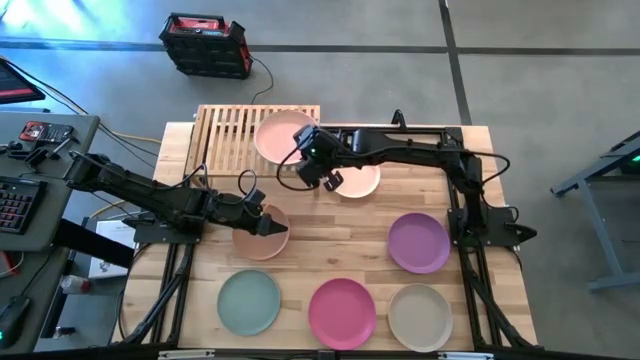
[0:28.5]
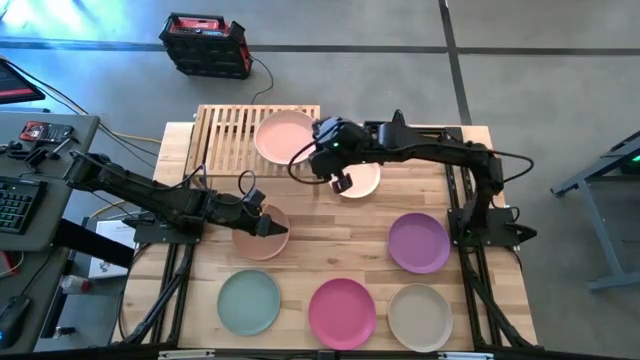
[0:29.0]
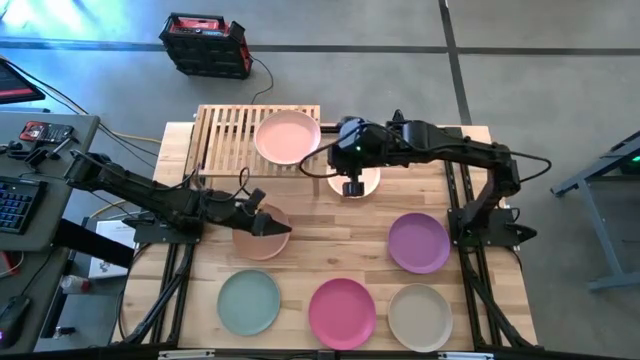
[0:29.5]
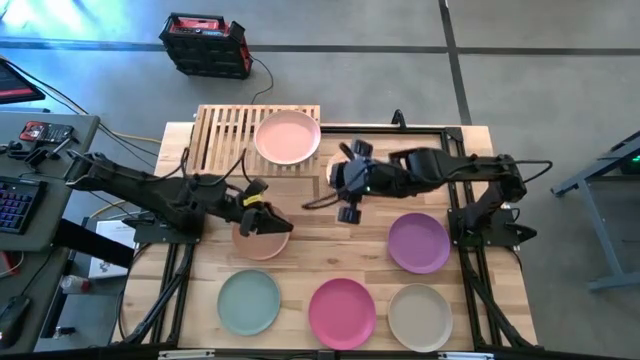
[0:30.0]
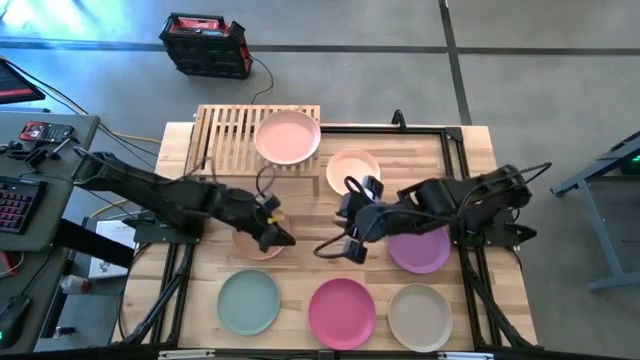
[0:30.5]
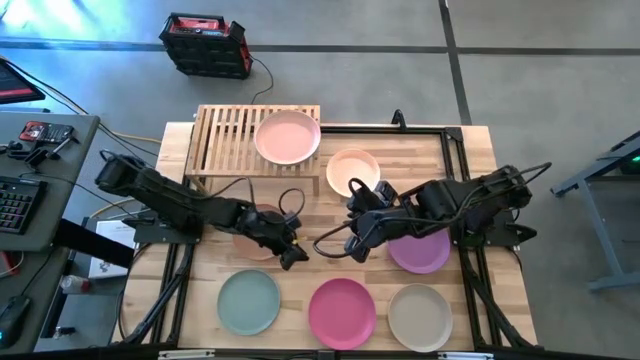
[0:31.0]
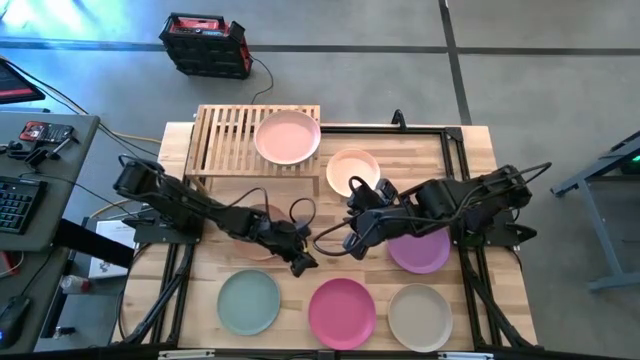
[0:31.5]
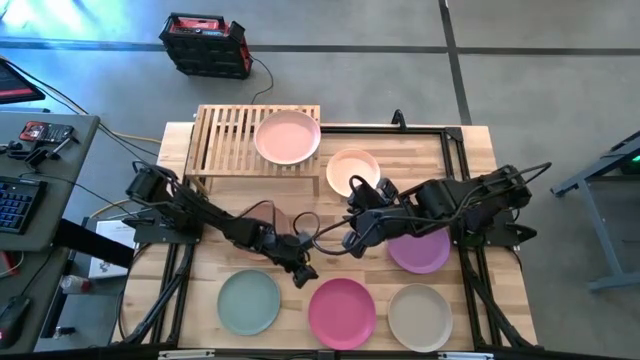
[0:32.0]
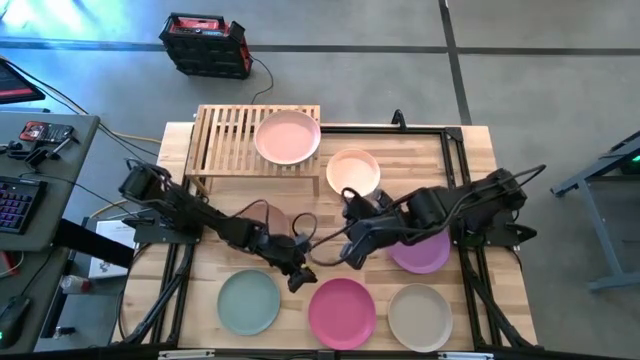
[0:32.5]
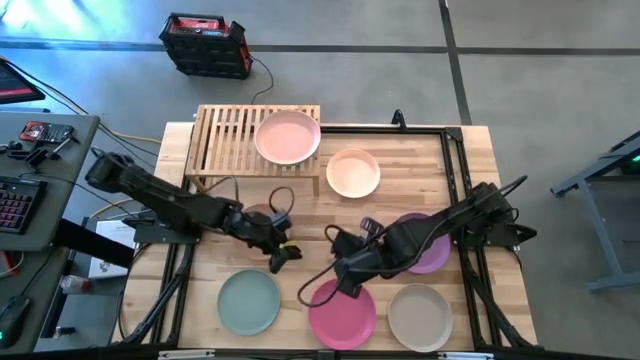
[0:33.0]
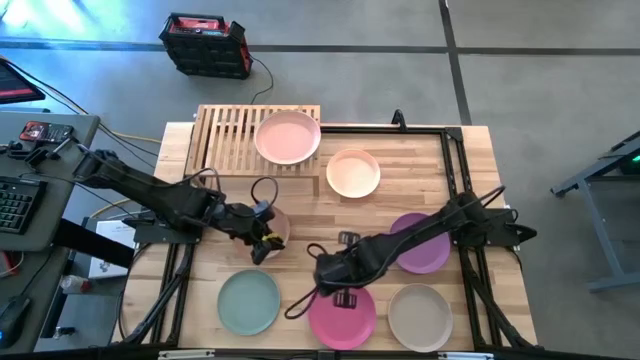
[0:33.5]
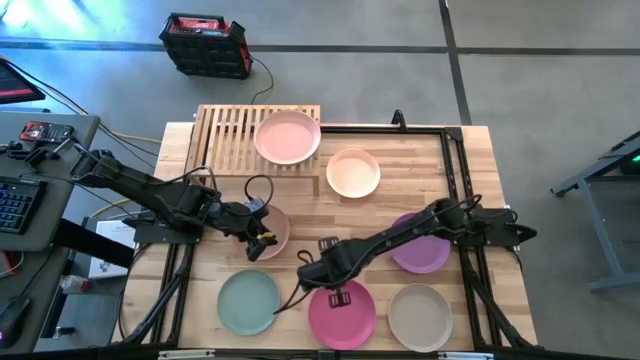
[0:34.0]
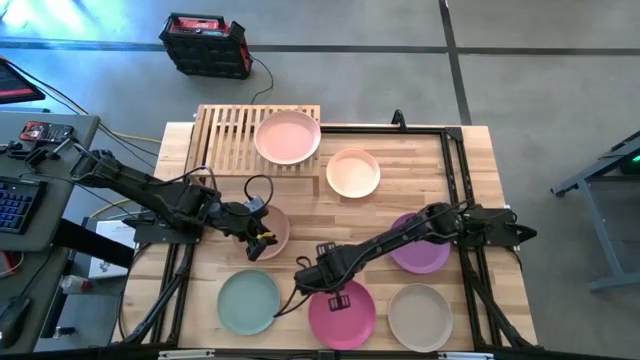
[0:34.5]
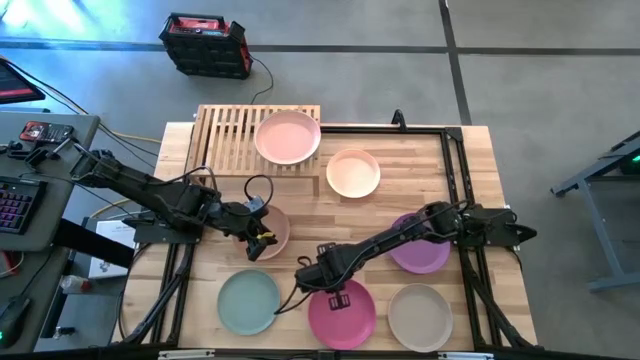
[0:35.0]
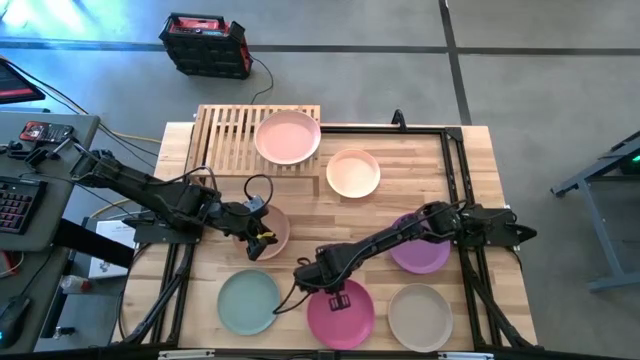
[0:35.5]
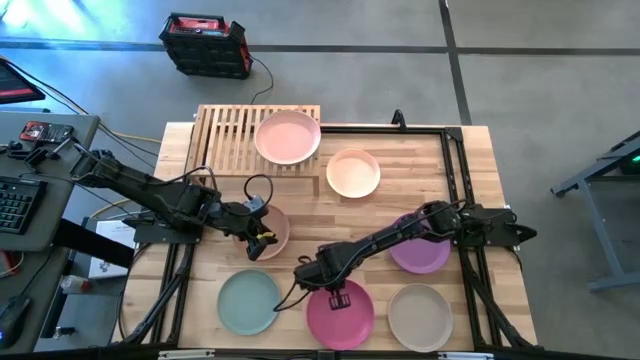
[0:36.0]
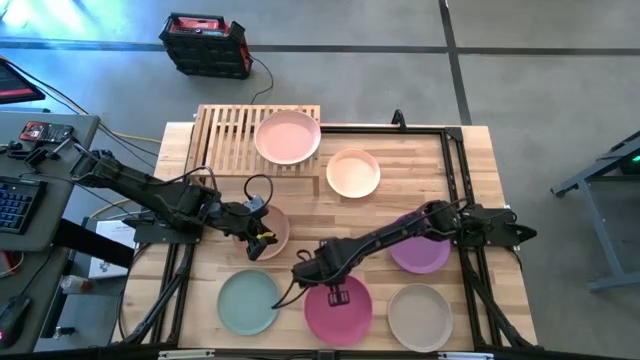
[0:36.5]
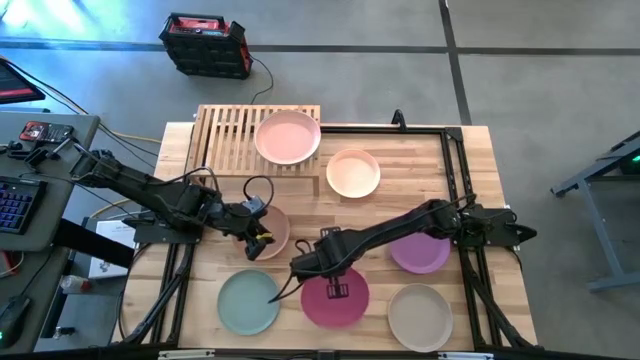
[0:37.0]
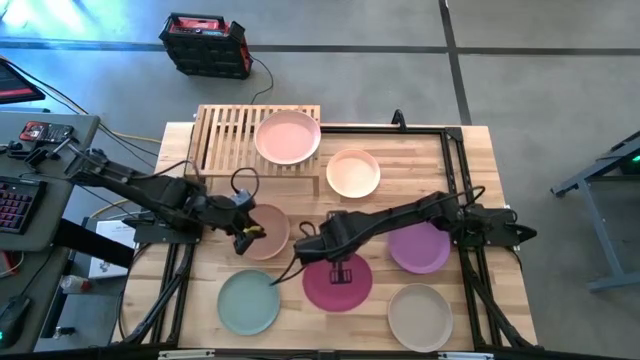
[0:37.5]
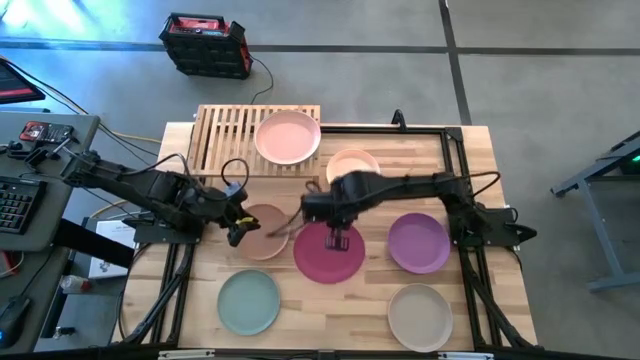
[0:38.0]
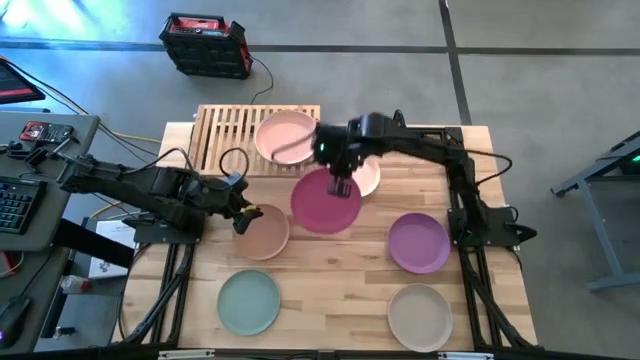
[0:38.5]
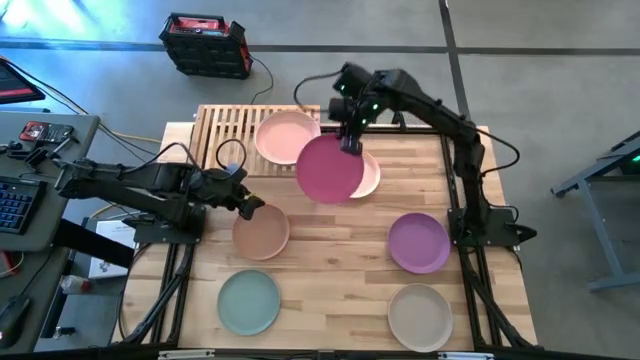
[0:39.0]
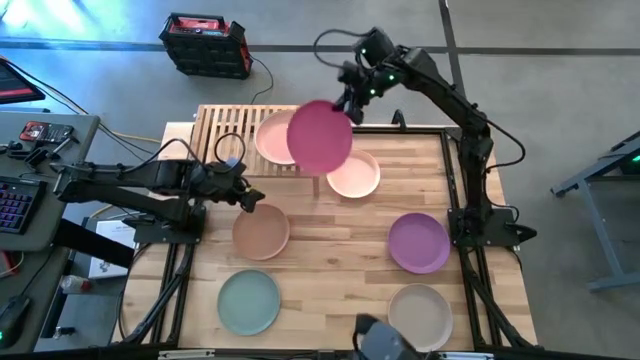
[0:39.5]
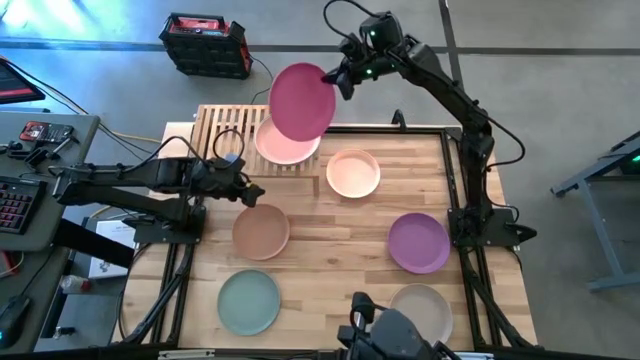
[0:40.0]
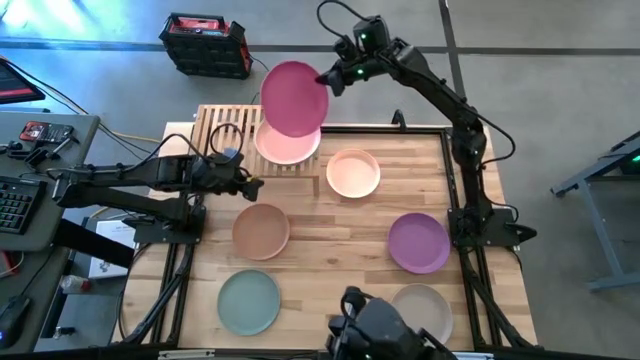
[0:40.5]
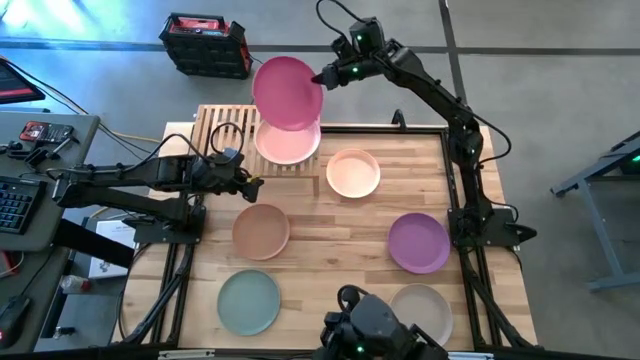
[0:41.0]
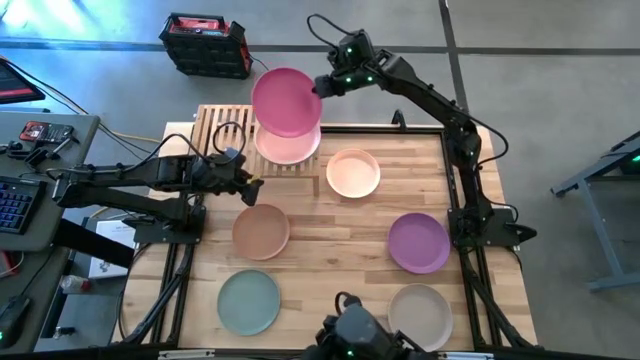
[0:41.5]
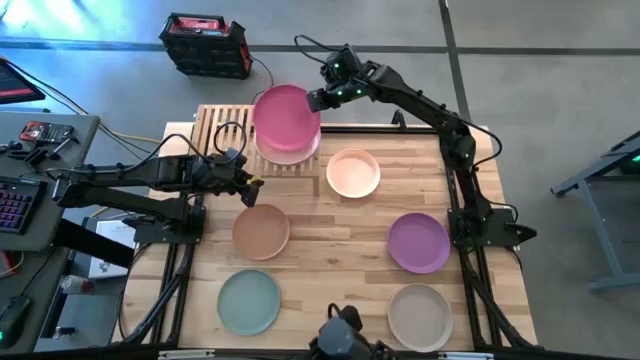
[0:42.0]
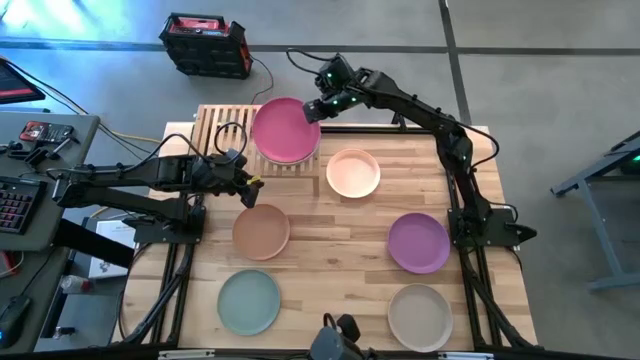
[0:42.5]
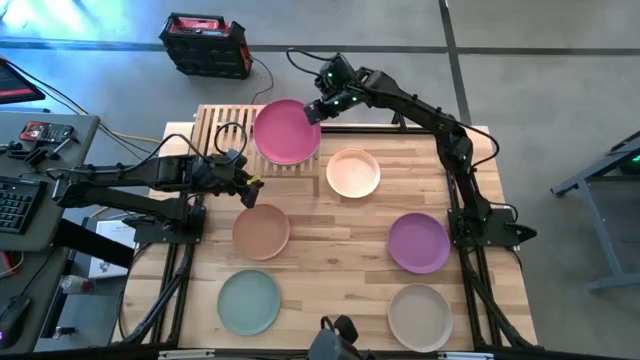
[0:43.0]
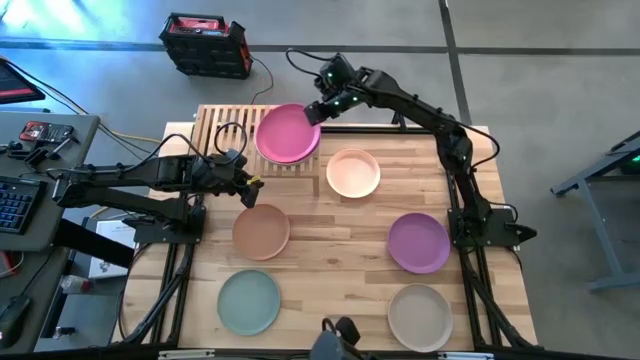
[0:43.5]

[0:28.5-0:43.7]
Task: Place and stack plates onto a shelf
Stack the pink plate on top of the brown plate on the shelf
